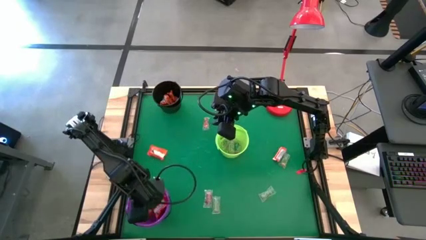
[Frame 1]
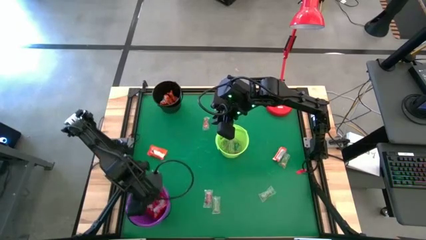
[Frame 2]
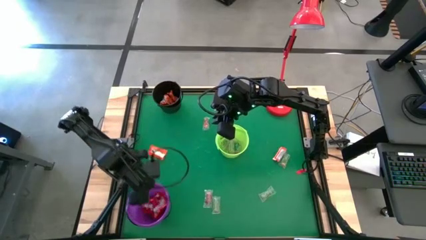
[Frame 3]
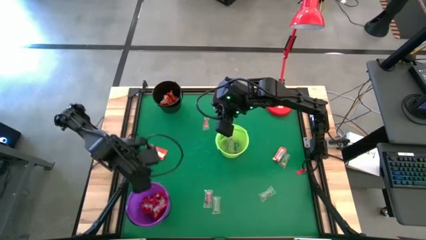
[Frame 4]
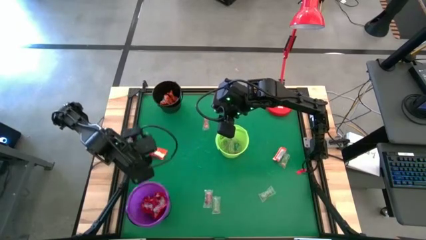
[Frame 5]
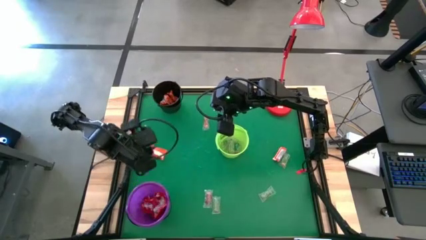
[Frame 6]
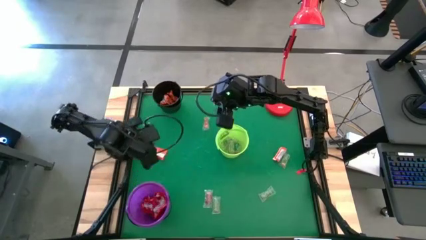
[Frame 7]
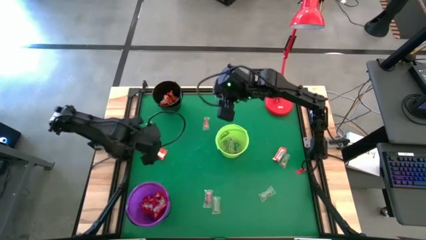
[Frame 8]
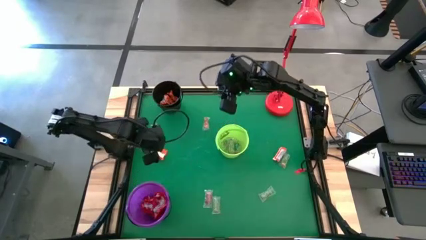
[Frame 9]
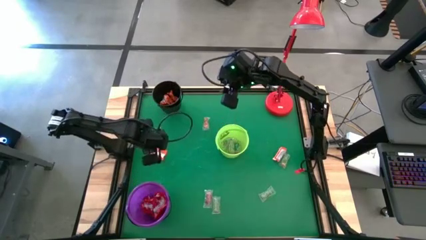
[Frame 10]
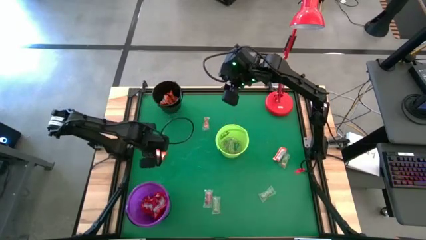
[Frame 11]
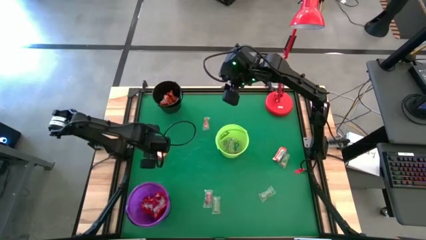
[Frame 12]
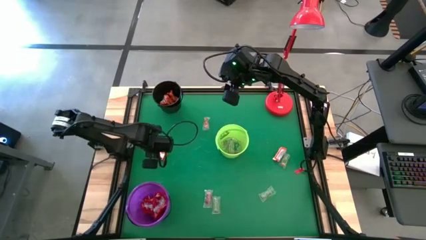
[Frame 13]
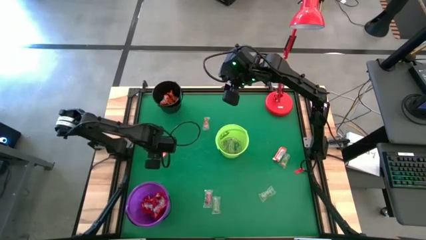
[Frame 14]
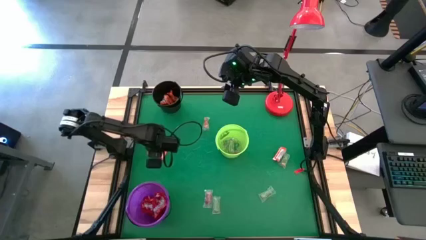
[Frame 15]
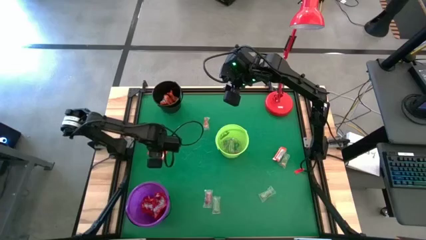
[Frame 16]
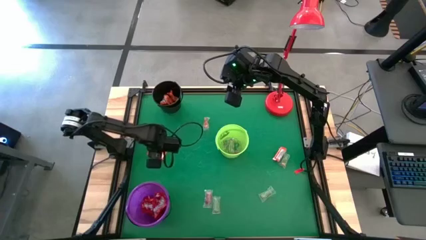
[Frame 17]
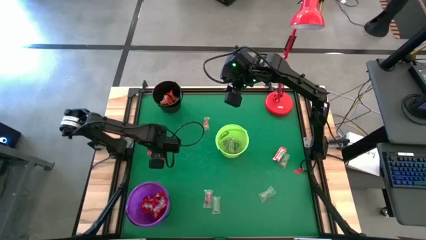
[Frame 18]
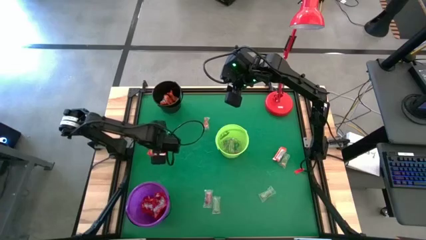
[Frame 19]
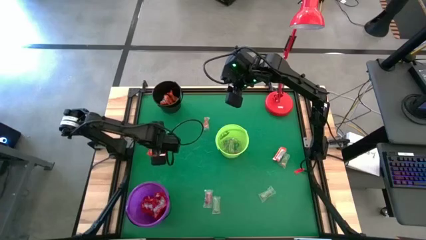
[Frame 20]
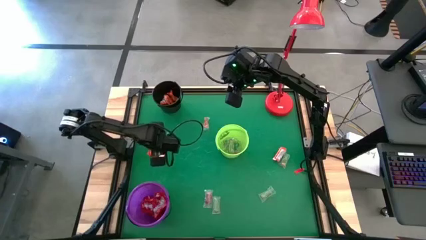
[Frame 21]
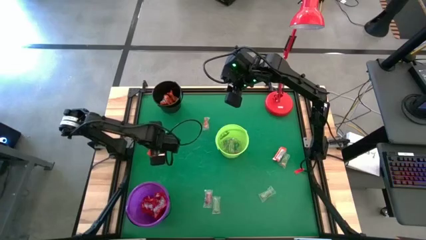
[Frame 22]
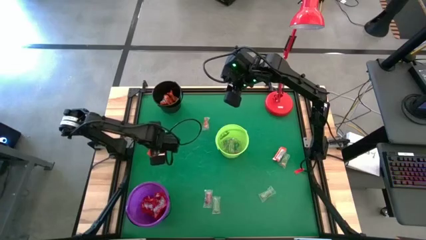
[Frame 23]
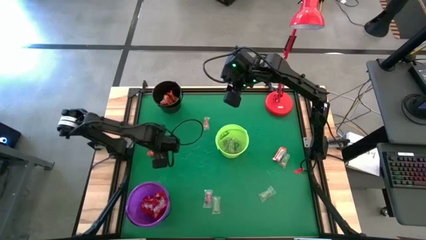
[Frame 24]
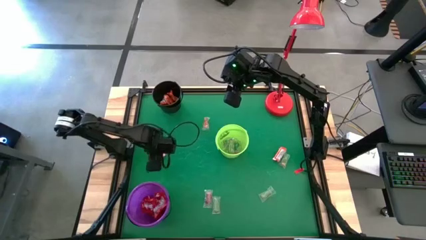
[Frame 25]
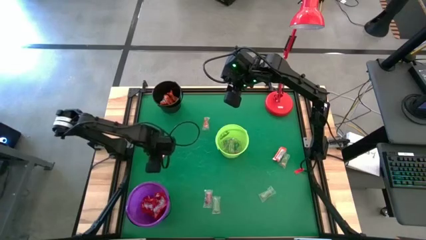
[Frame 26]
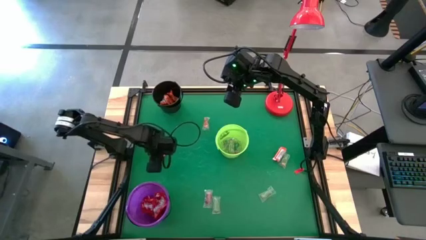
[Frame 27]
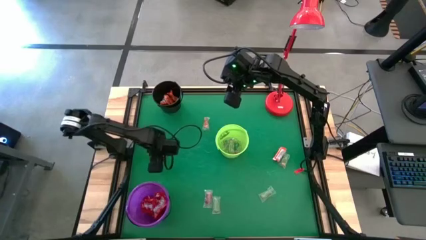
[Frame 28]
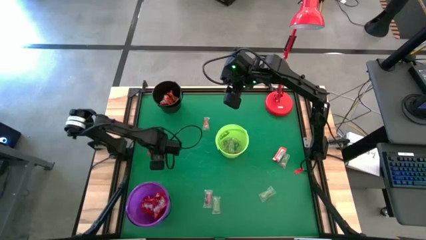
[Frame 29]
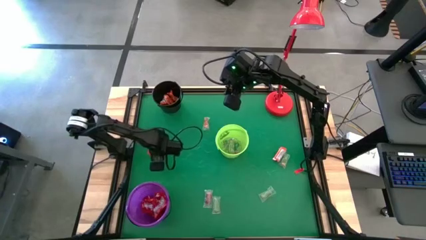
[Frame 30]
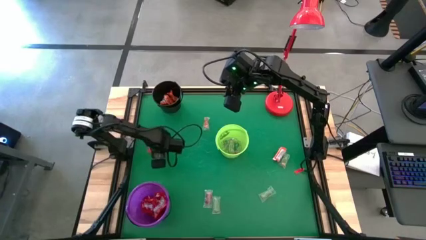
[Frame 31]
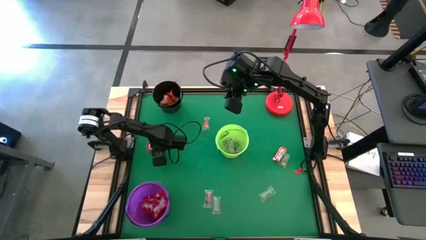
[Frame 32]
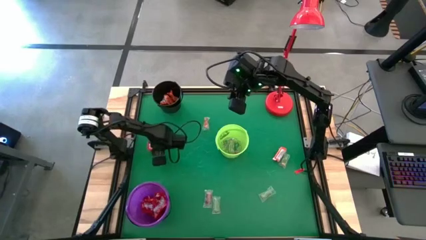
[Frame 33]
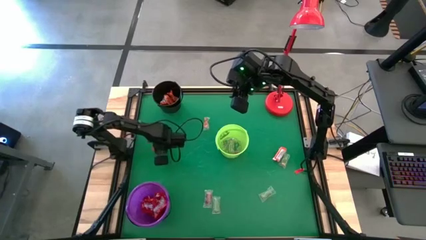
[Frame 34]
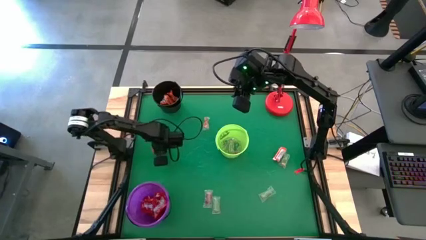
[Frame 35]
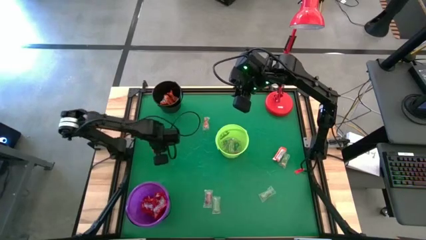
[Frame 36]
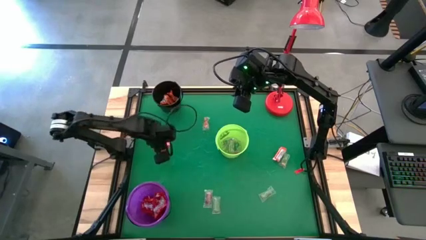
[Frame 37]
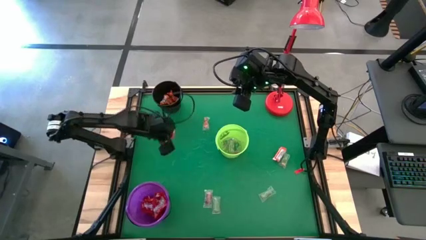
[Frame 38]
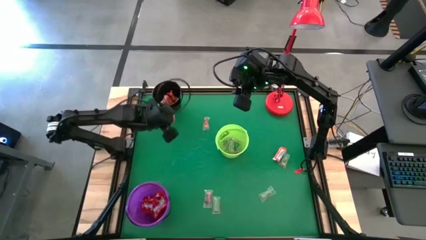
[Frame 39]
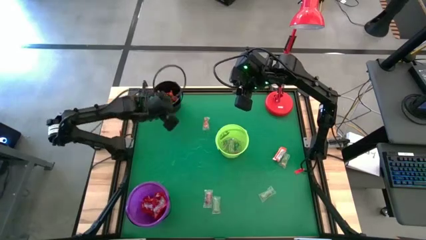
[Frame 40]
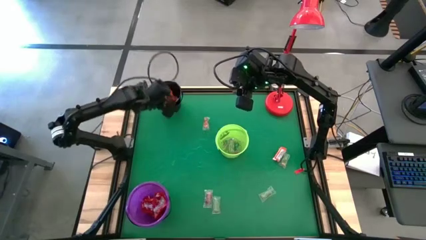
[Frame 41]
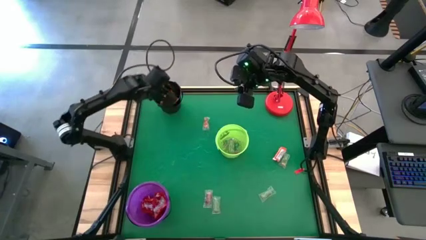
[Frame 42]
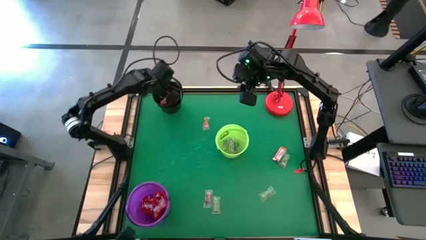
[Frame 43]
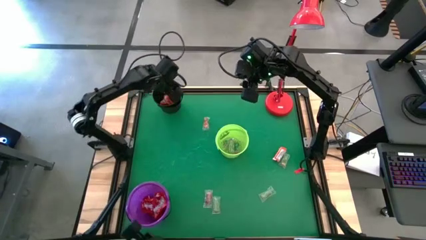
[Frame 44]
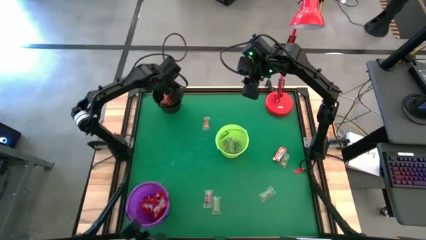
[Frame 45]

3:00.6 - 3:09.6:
Task: Sort candy
Put the orange chocolate into the black bucket

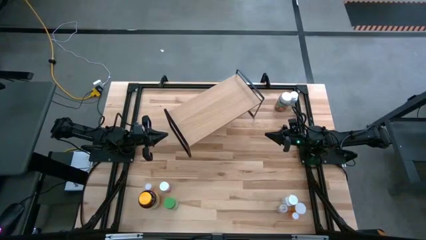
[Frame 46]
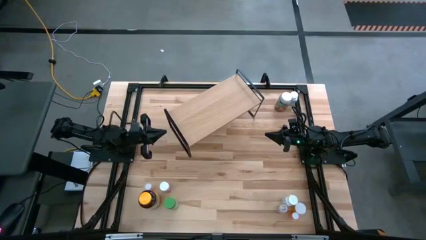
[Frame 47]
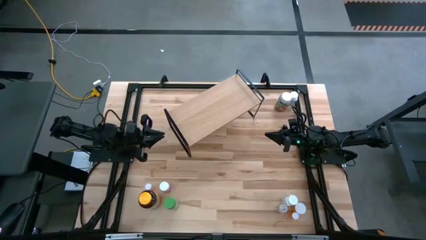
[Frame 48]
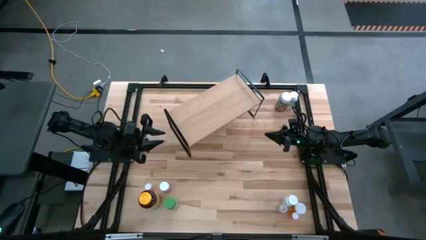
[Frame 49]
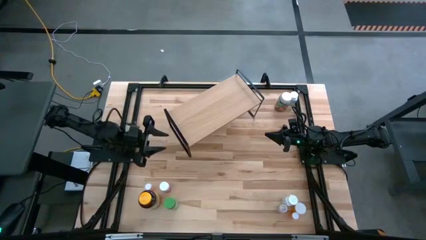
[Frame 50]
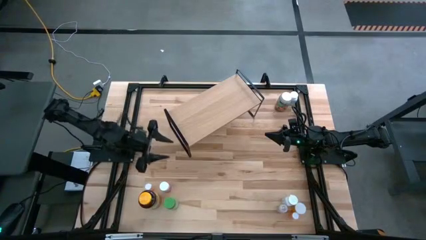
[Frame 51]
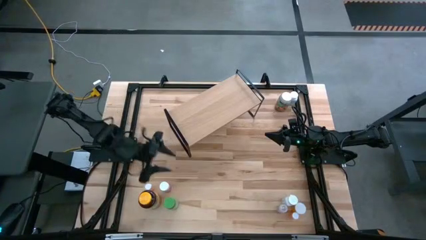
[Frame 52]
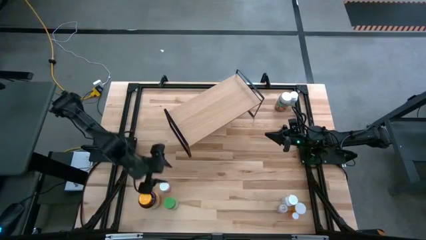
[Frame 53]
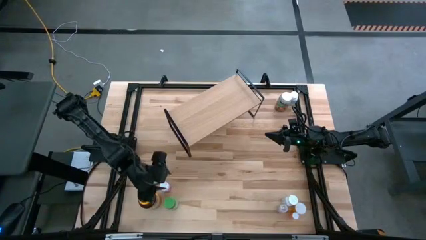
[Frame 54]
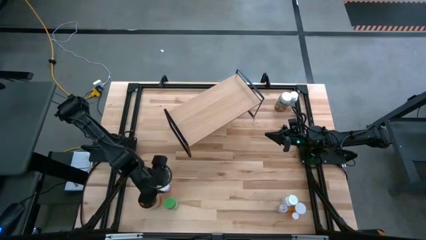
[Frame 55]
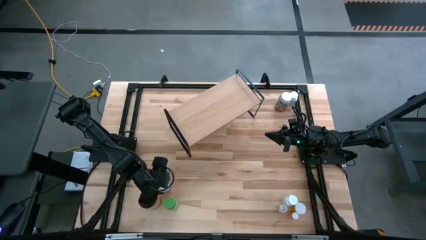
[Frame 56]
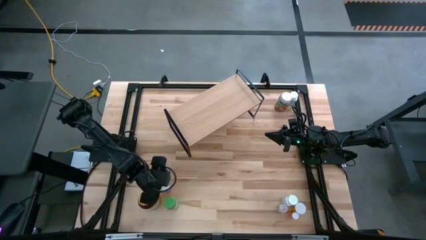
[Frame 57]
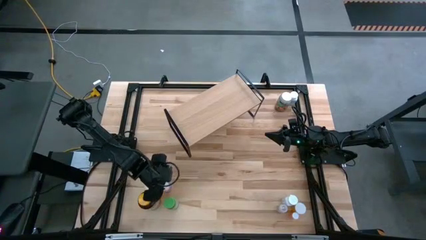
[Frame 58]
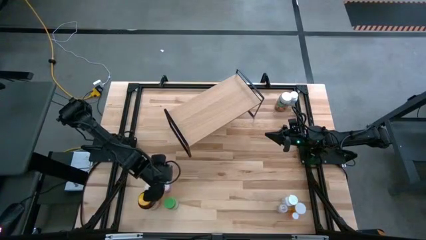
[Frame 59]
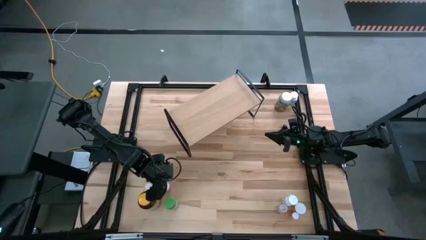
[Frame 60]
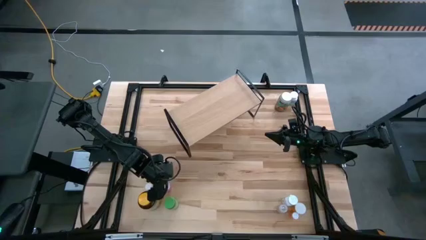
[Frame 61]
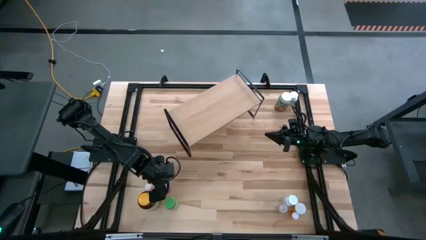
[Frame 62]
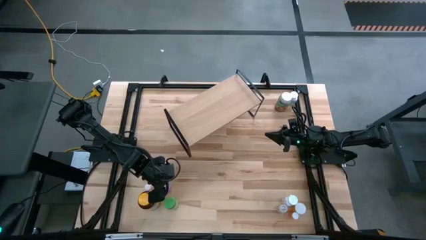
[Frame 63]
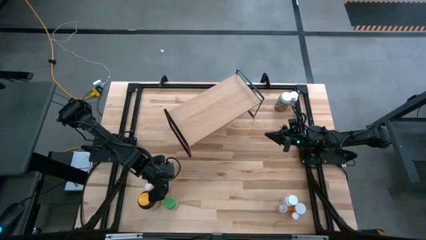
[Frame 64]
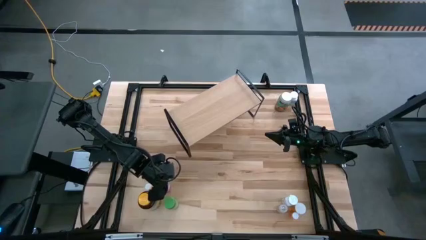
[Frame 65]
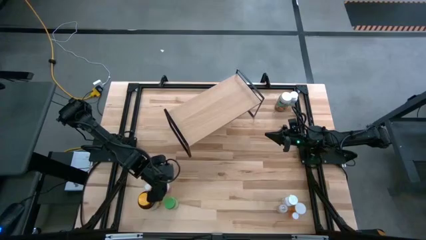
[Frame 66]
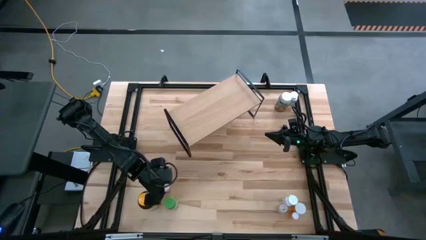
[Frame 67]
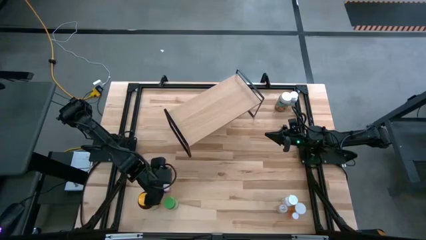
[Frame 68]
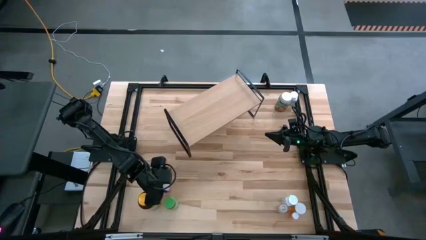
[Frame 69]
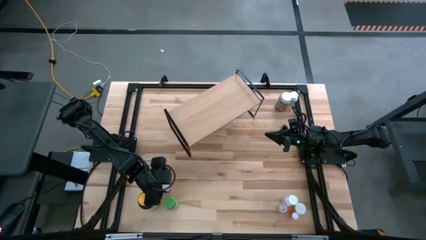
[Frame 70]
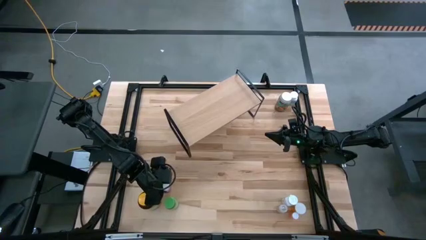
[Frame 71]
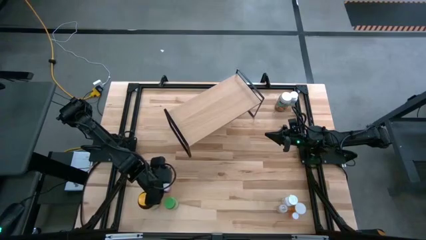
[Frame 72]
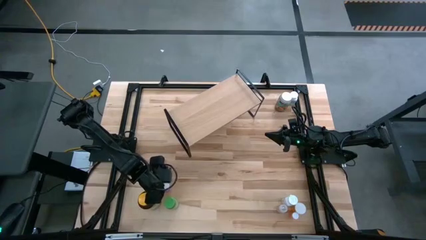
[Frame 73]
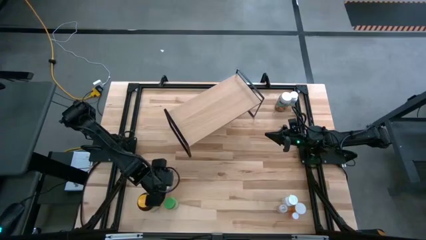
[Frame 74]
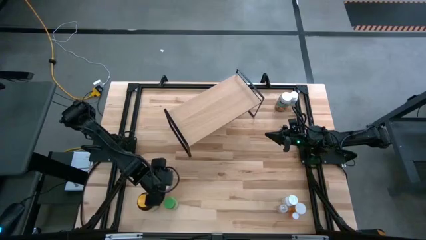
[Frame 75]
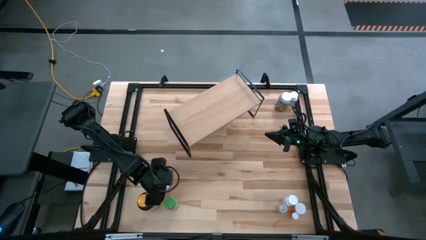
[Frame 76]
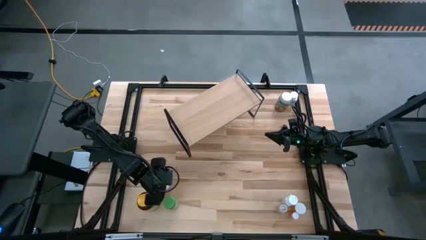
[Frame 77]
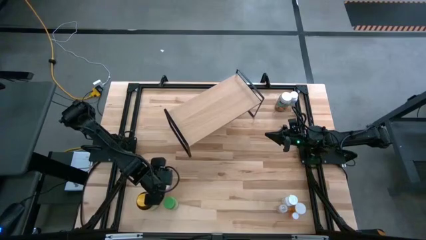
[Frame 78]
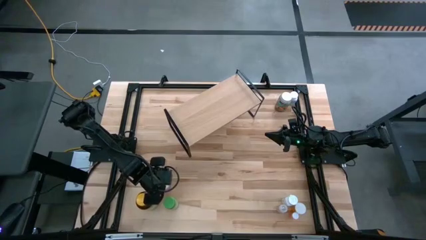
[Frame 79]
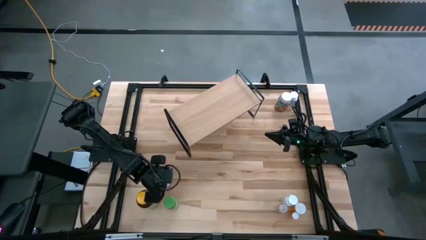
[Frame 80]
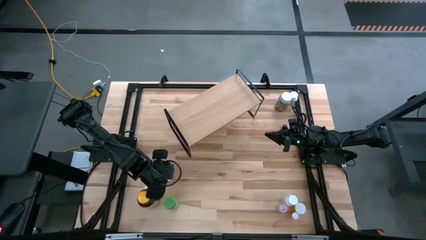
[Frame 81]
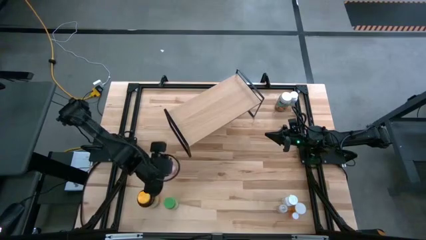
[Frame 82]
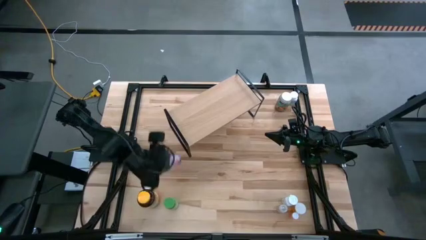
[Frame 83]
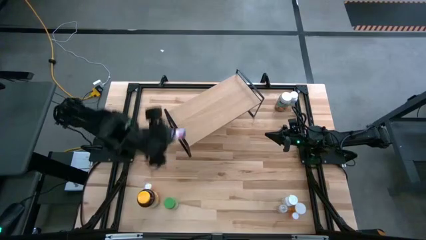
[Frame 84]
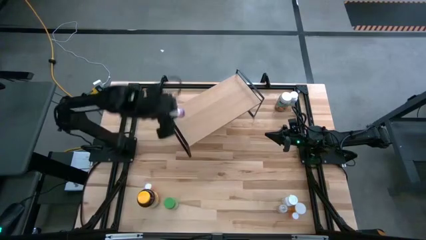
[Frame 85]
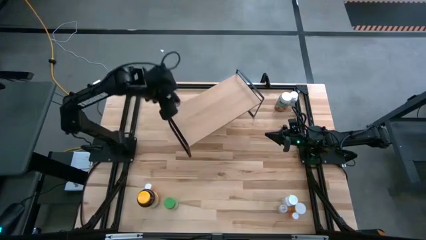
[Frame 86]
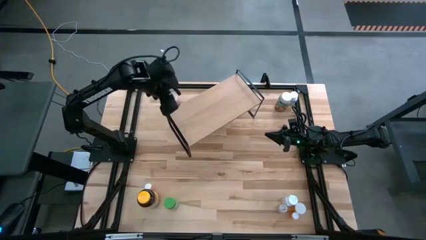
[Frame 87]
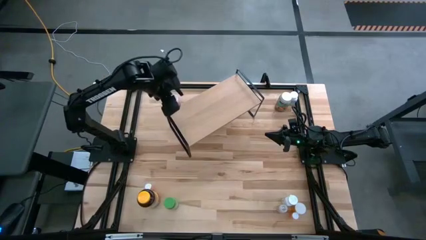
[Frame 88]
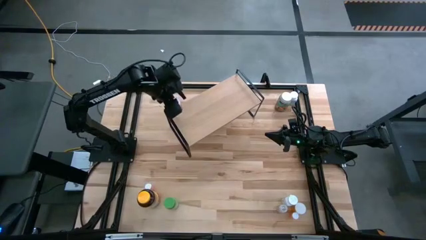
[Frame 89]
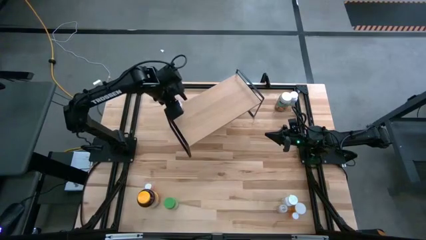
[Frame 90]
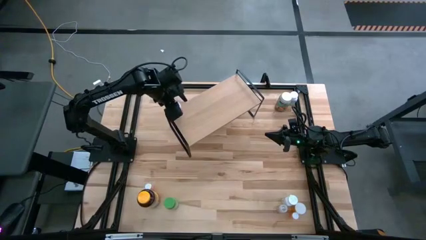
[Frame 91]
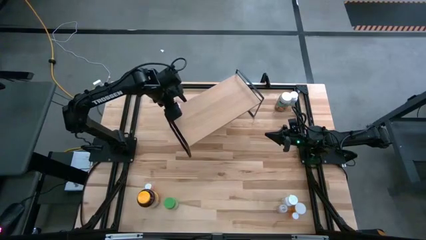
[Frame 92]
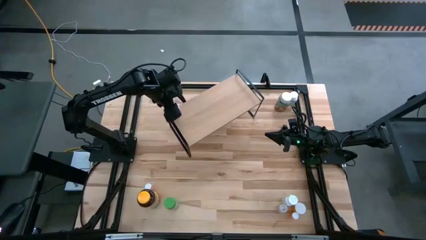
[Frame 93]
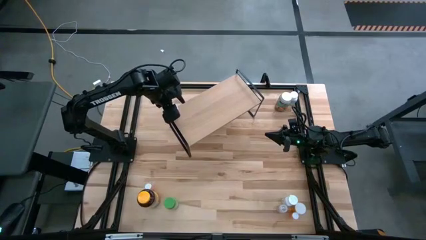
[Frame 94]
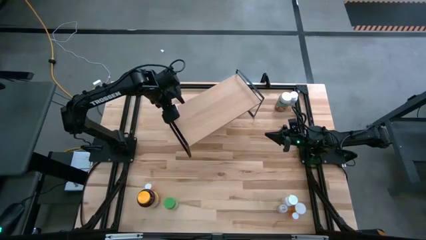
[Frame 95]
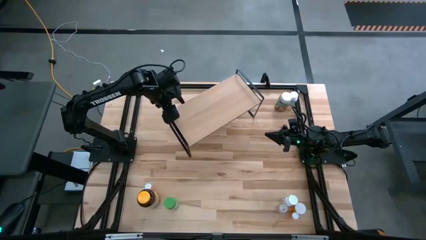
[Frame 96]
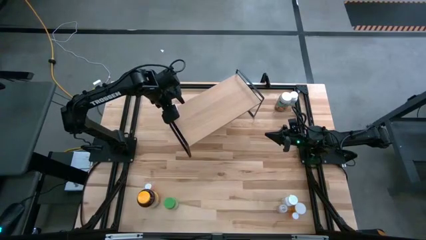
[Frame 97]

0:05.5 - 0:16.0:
Task: Pick and place medicine bottles onto shelf by color
Put the pink medicine bottle on the shelf
